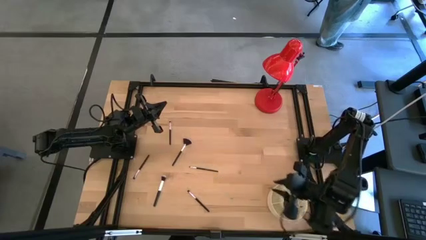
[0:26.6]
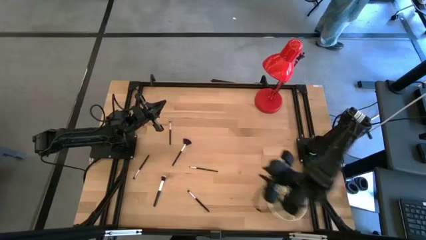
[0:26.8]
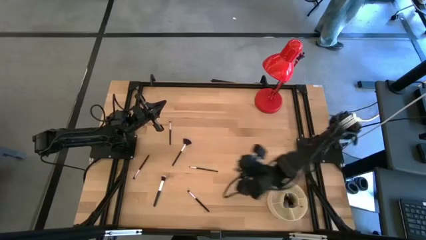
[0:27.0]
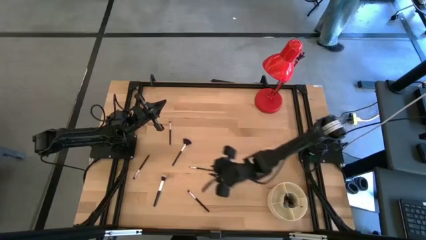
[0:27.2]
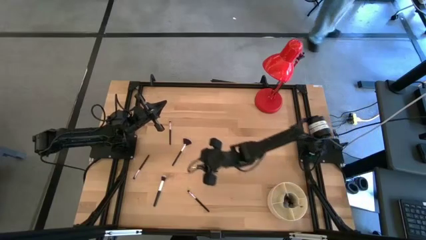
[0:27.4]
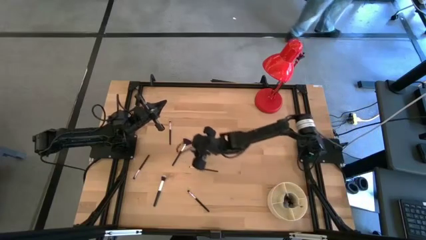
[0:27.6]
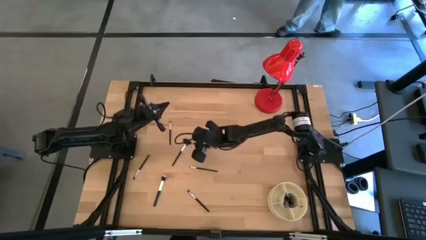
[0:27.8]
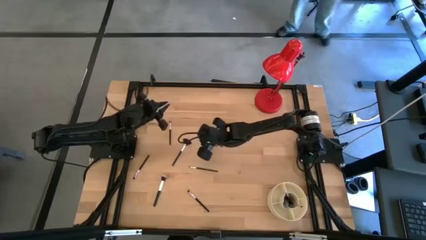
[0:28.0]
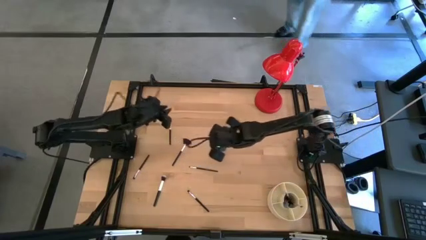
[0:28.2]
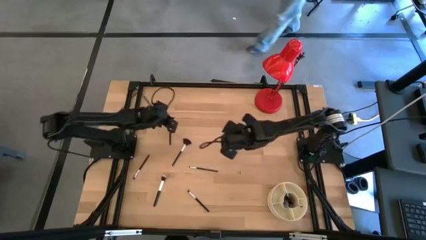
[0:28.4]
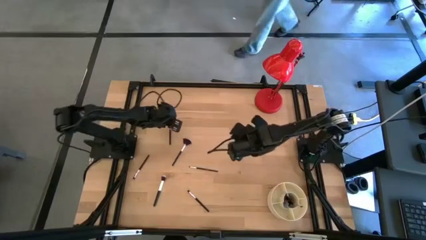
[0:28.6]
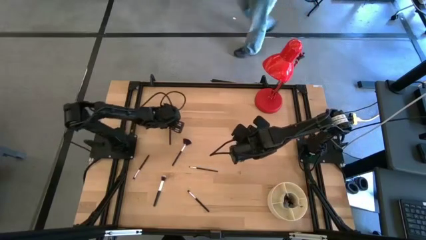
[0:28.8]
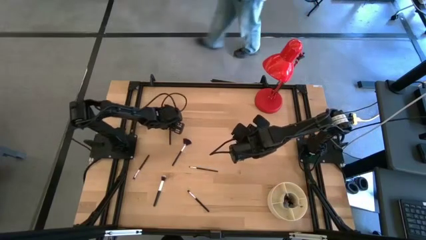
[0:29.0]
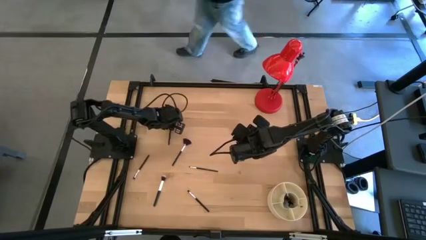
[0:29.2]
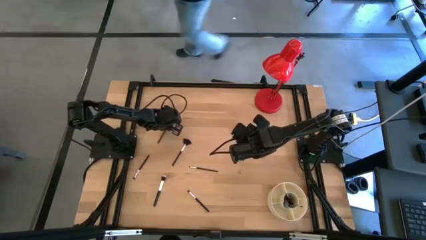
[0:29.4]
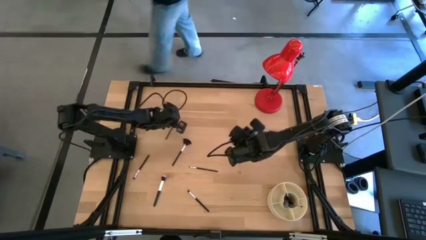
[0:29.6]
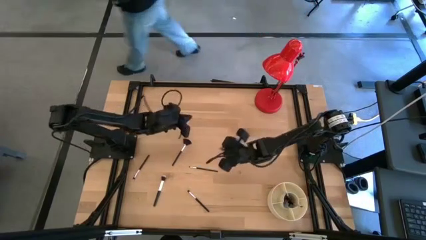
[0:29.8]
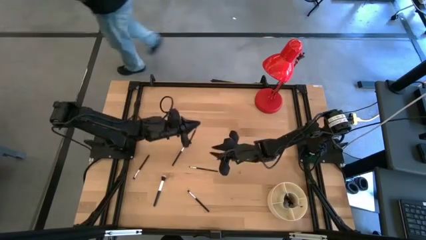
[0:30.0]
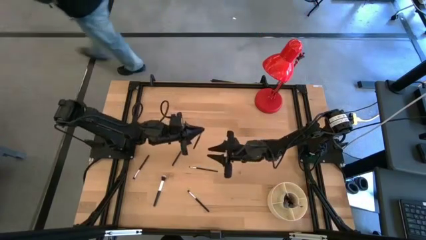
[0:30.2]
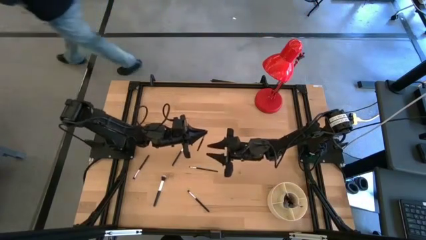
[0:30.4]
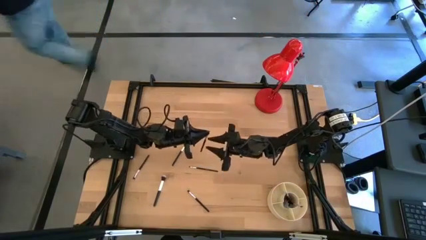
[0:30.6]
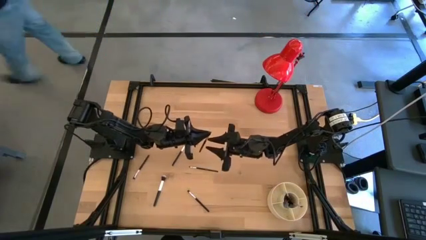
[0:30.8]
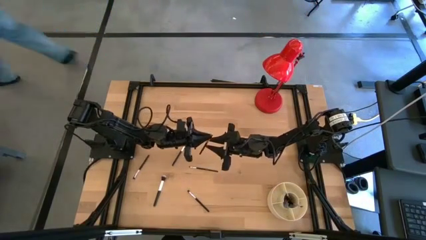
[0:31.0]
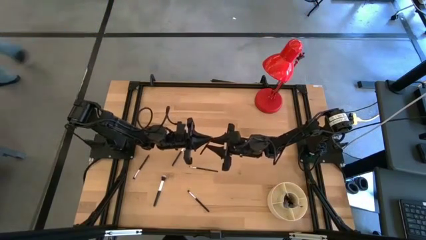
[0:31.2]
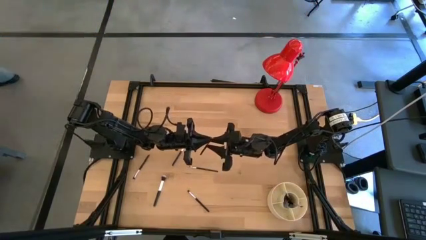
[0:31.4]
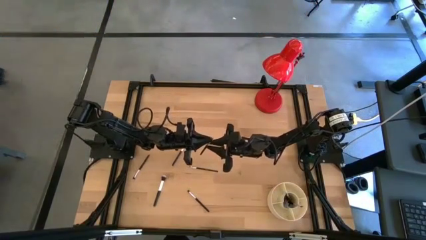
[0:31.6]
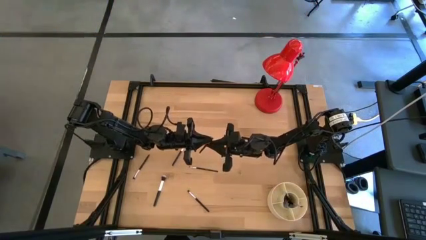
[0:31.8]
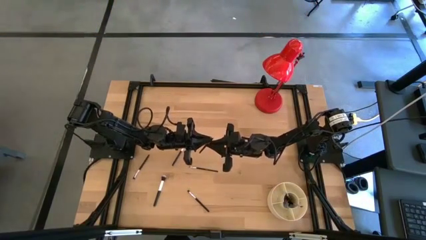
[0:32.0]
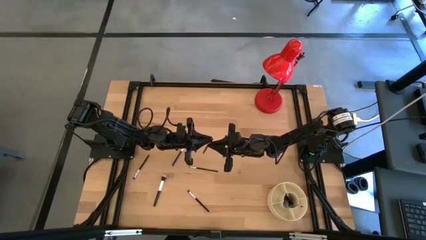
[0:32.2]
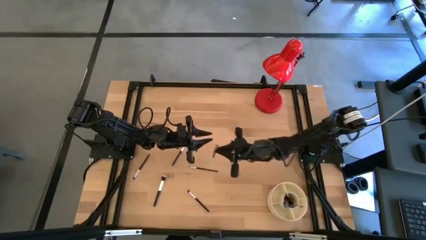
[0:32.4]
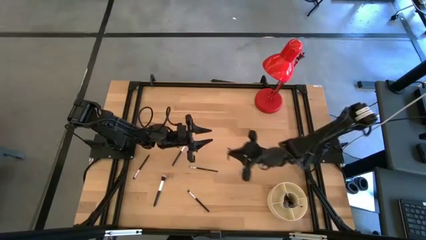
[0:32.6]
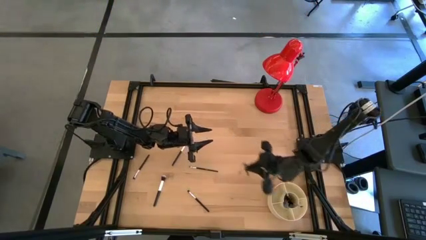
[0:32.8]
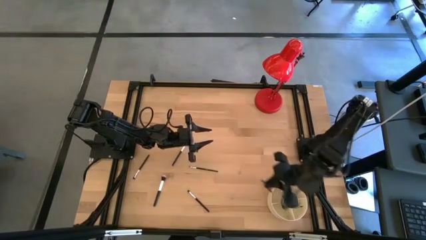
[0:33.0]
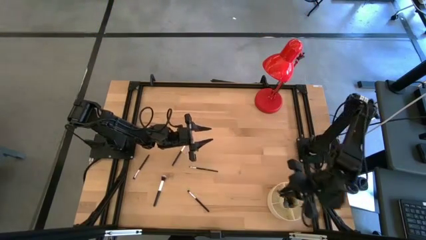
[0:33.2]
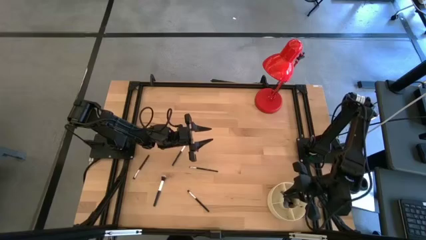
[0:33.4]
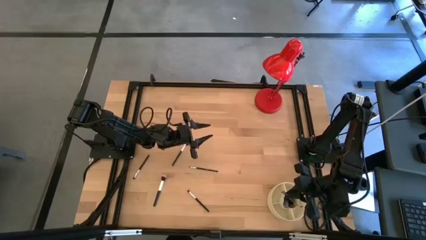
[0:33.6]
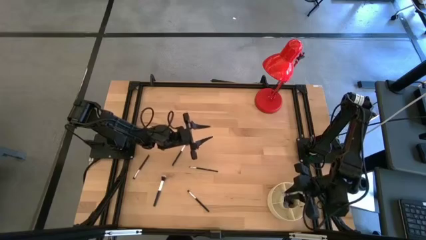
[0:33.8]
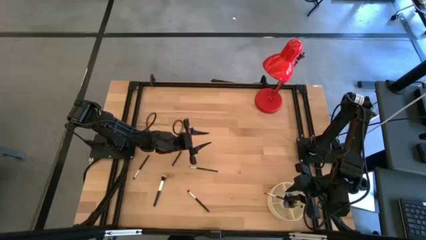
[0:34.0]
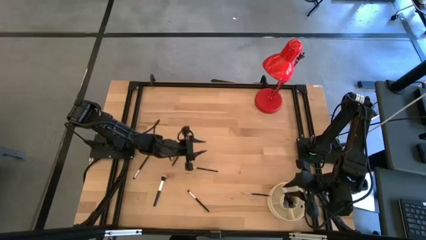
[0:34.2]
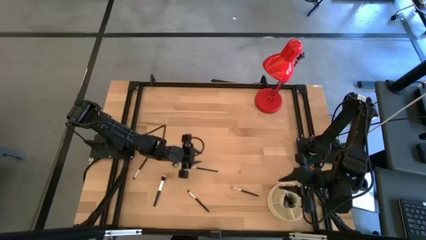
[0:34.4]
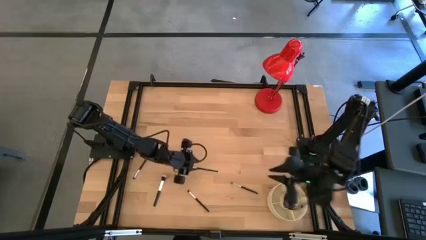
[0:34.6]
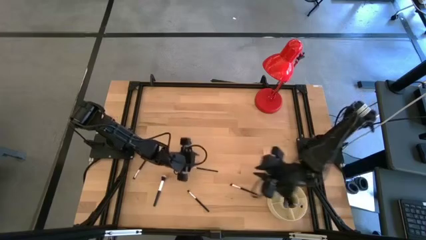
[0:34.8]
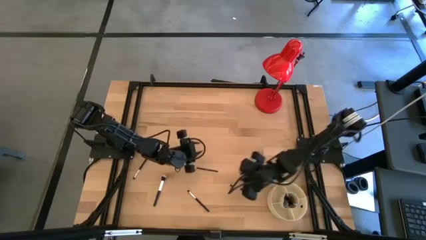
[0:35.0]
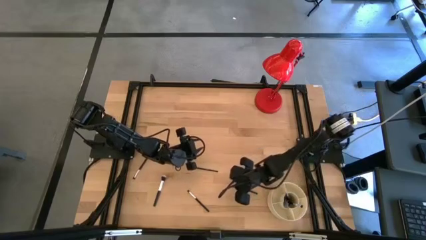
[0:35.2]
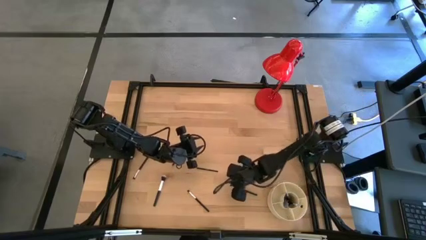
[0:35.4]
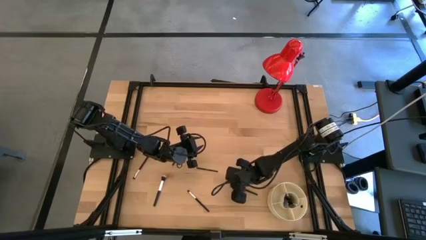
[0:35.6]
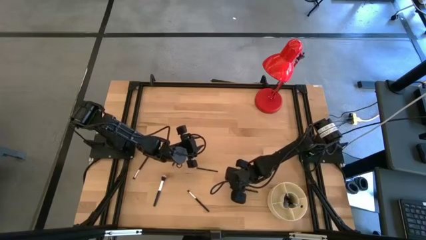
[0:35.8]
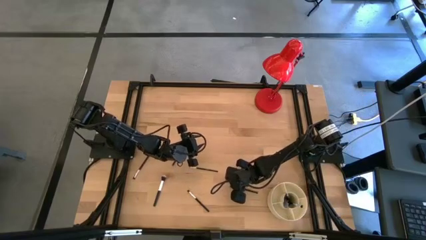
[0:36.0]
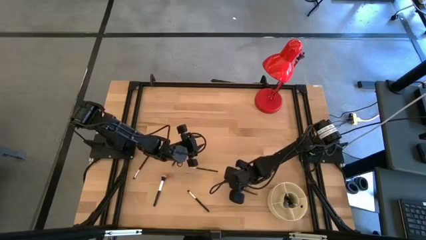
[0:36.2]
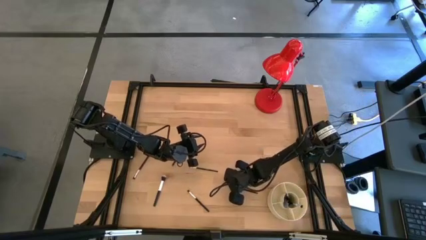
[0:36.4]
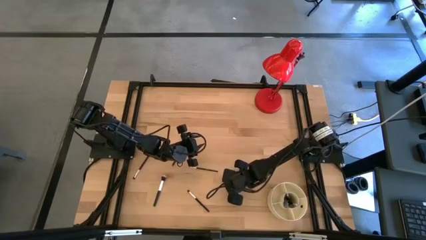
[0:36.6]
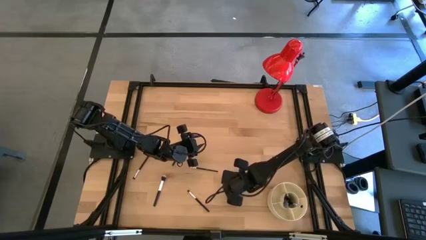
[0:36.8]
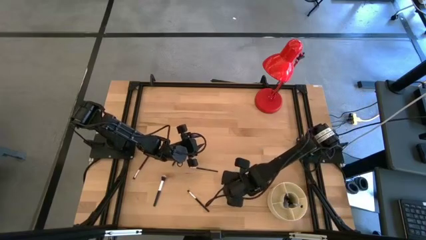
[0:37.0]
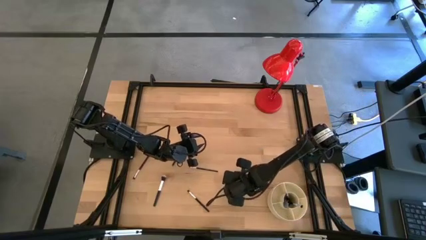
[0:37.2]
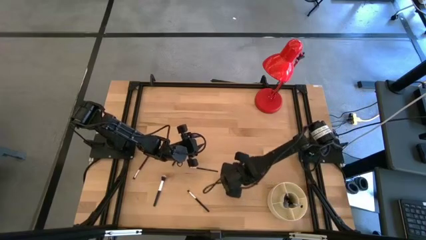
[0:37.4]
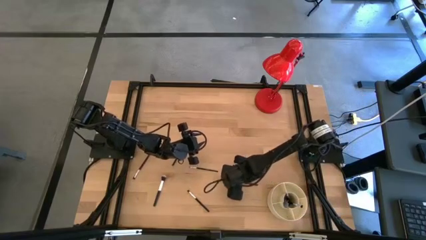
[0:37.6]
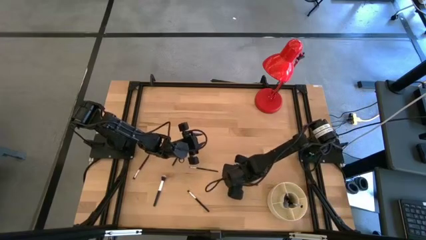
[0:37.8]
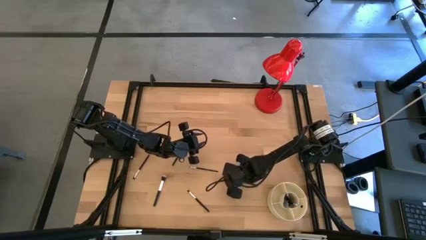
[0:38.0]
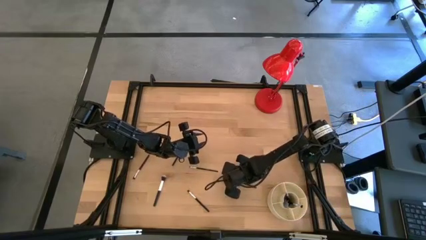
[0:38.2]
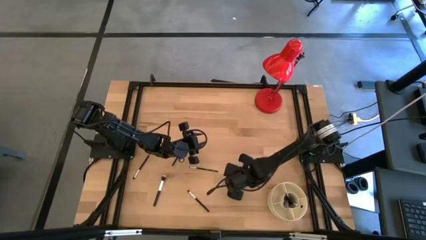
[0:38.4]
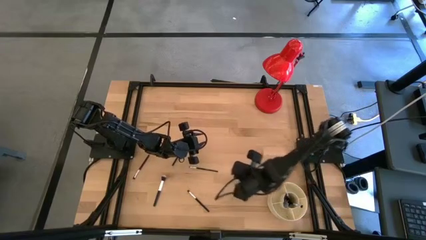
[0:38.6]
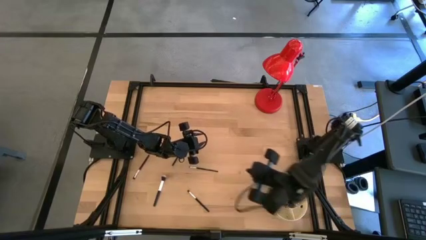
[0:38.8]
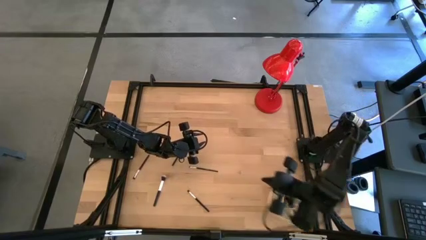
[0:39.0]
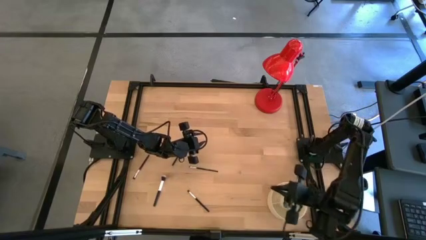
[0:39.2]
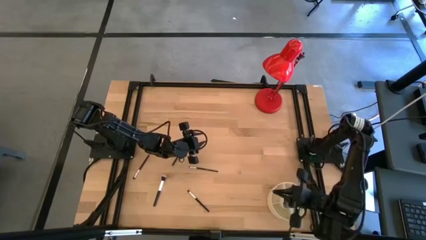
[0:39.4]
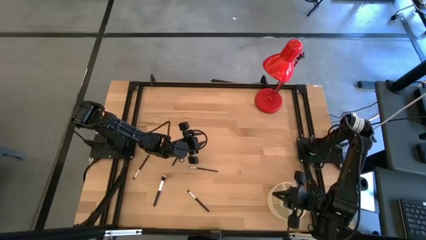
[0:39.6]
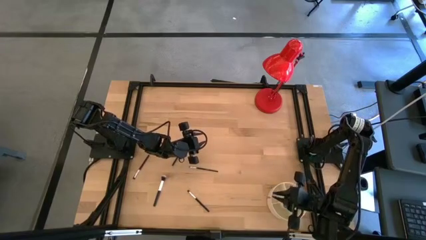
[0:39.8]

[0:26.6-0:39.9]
Task: Put items in baskets/containers
Put the black eyeshadow brush into the yellow pen organizer

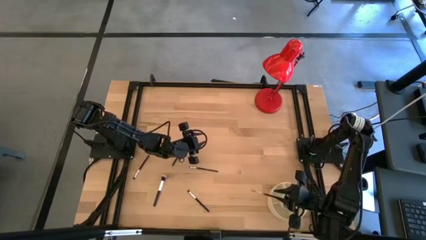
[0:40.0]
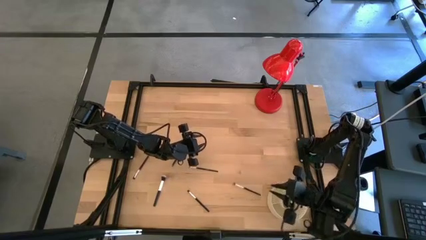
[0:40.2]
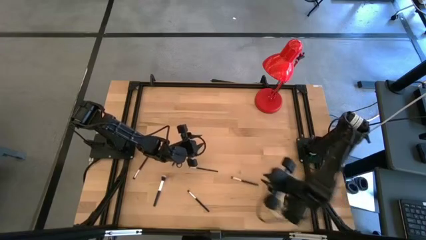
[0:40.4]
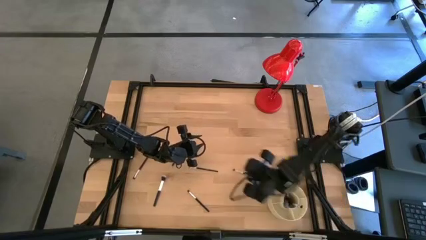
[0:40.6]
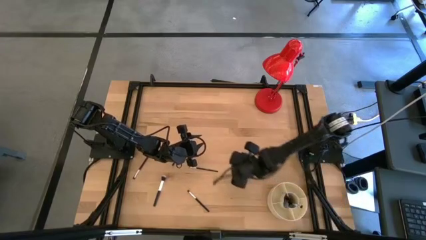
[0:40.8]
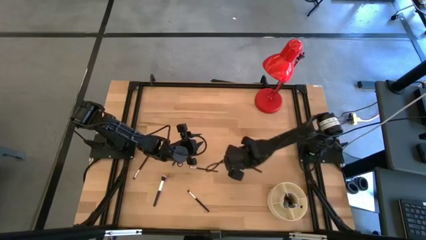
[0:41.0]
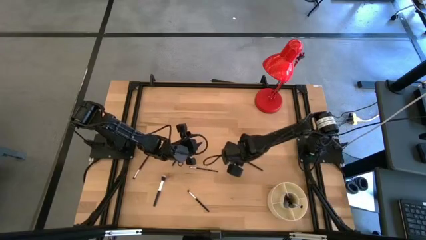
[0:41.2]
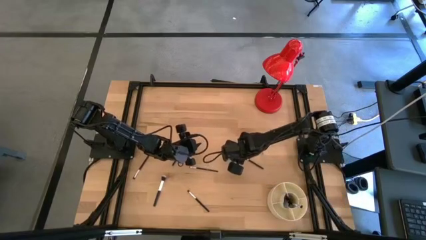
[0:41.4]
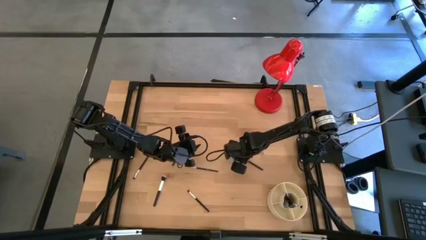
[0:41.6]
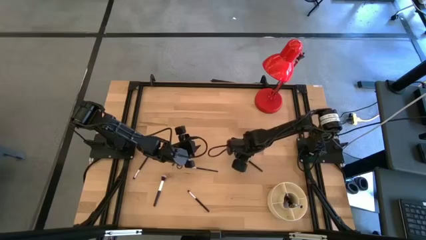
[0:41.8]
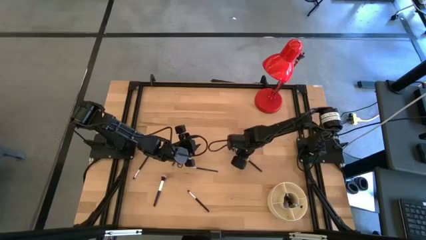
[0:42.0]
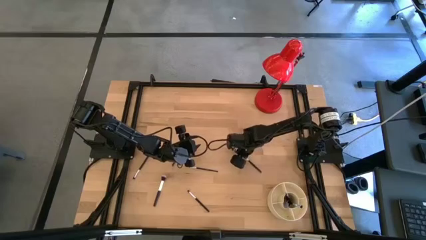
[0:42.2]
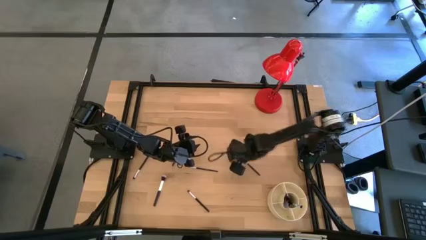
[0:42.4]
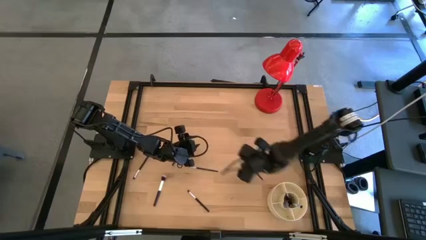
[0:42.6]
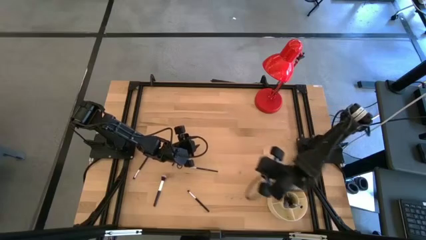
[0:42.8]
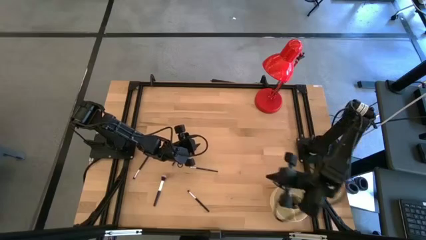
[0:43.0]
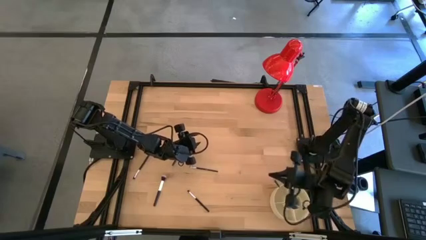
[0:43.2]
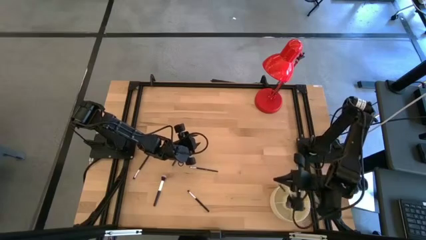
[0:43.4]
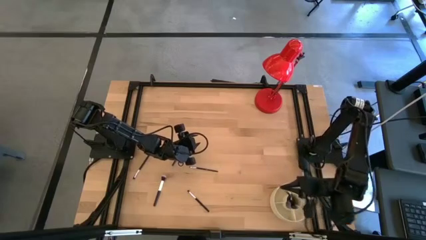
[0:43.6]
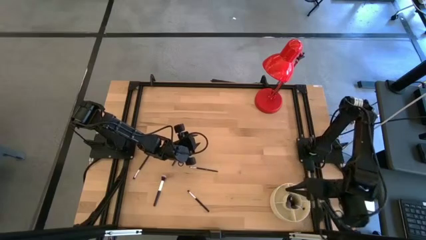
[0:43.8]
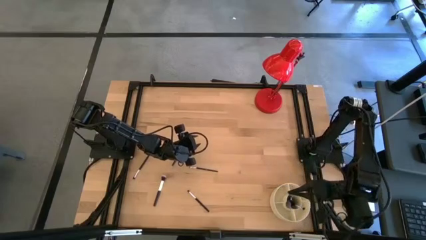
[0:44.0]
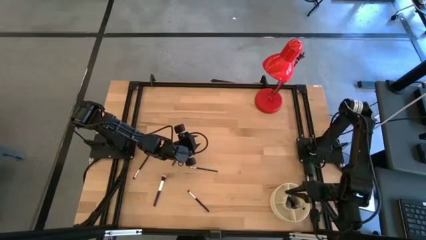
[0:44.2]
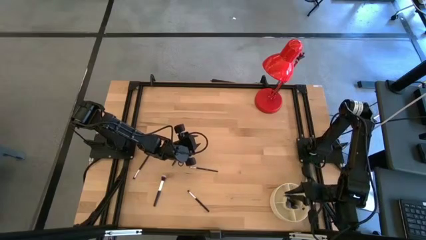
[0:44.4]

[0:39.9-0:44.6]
Put the black eyeshadow brush into the yellow pen organizer
